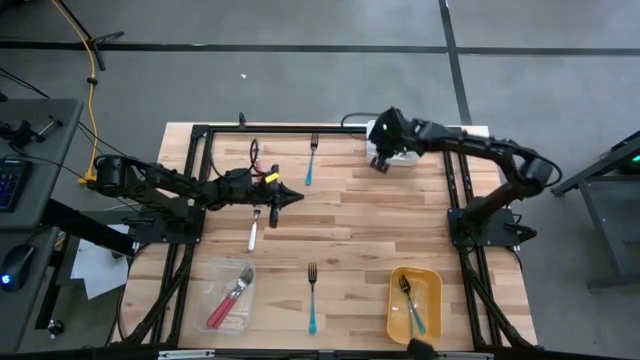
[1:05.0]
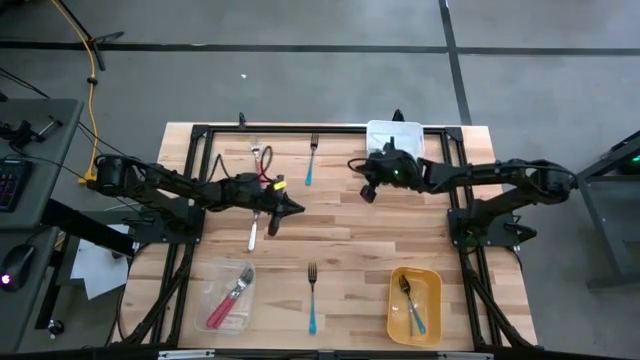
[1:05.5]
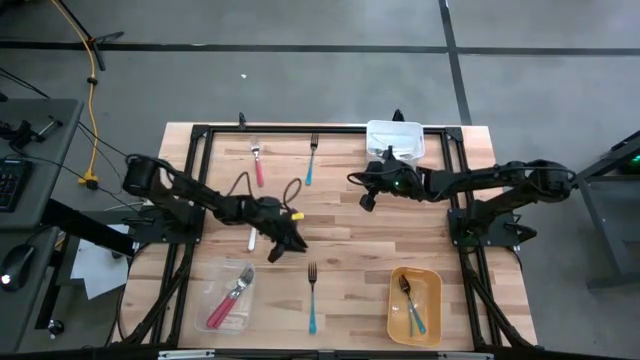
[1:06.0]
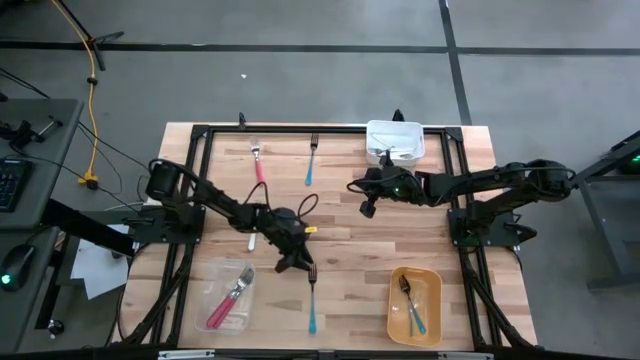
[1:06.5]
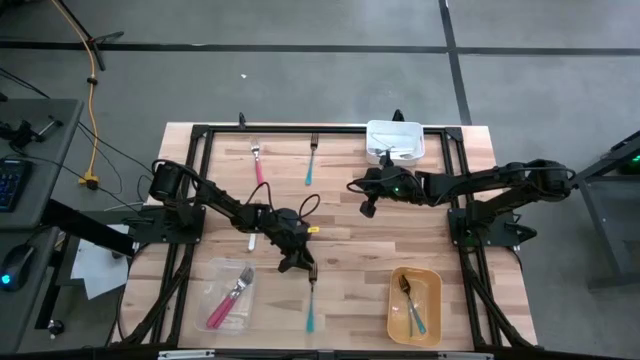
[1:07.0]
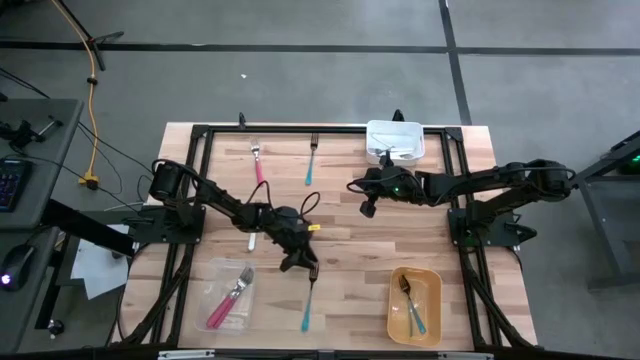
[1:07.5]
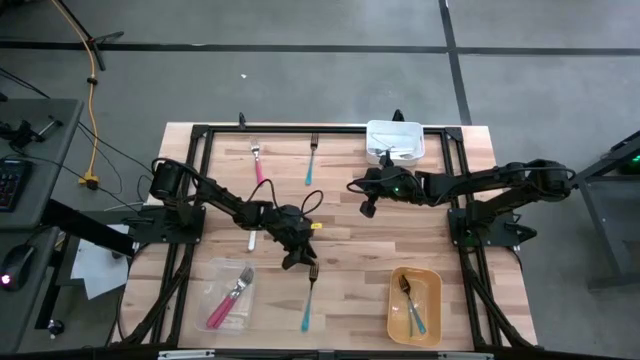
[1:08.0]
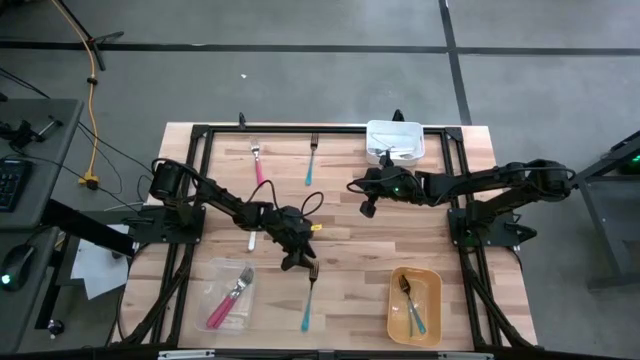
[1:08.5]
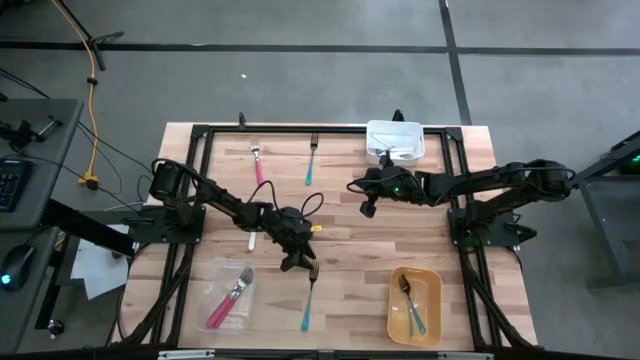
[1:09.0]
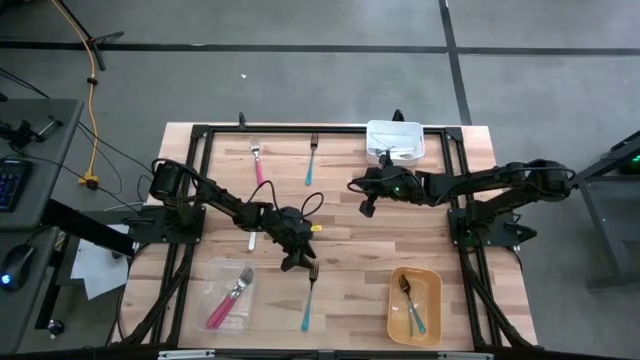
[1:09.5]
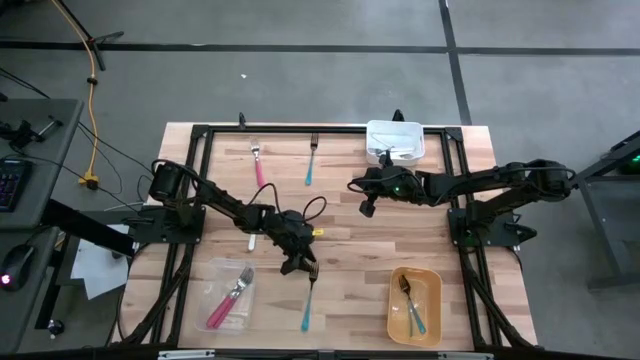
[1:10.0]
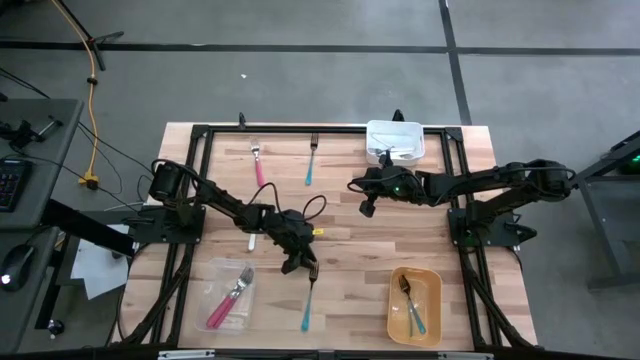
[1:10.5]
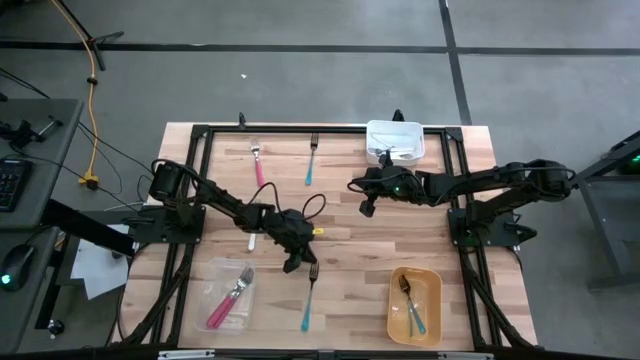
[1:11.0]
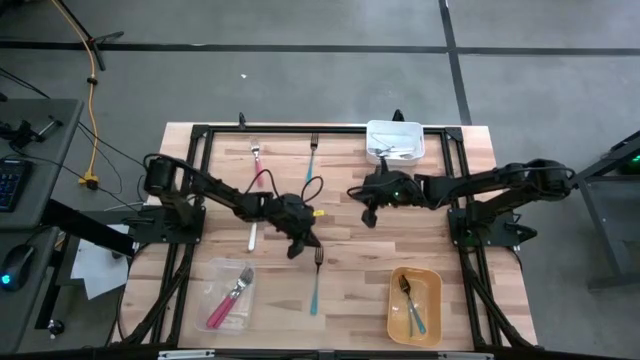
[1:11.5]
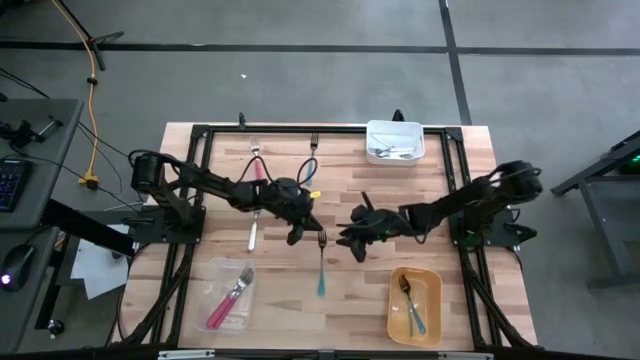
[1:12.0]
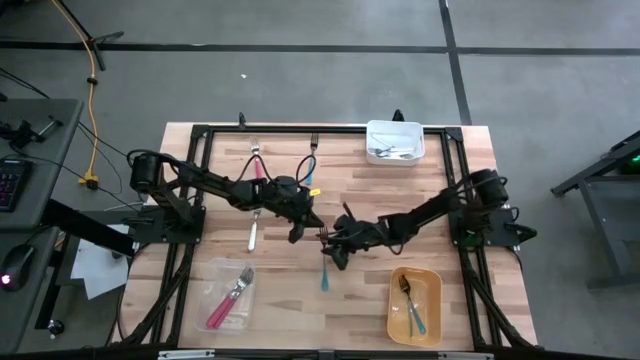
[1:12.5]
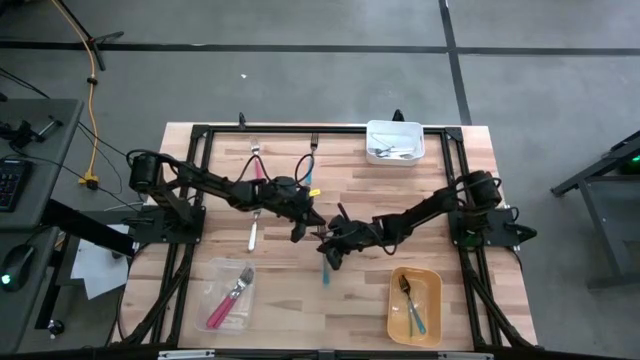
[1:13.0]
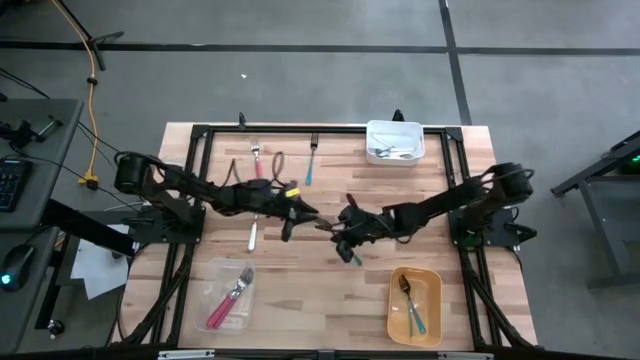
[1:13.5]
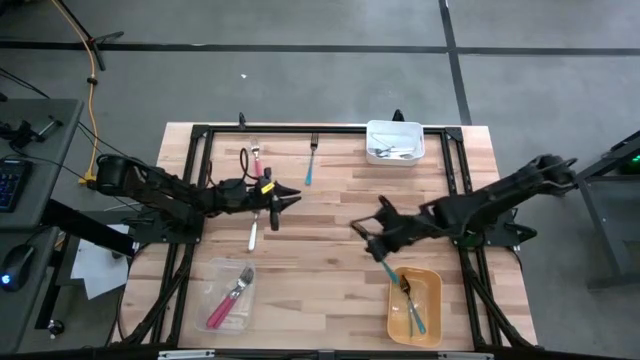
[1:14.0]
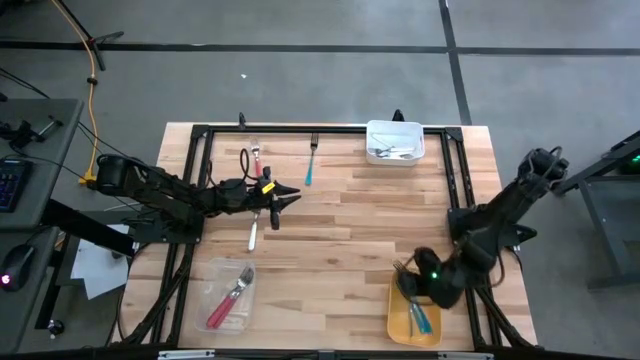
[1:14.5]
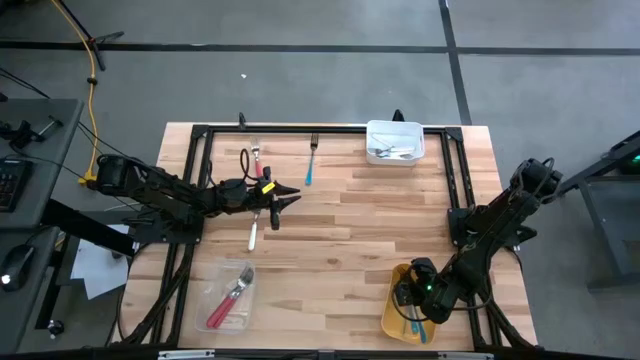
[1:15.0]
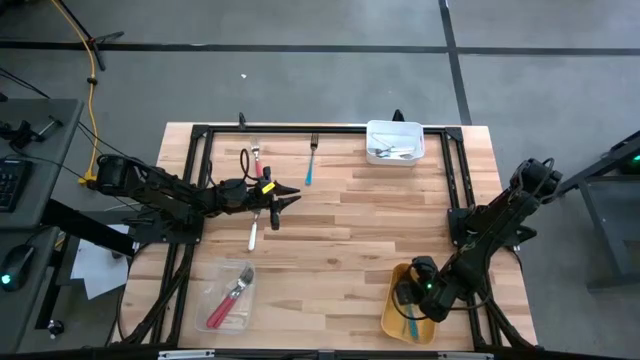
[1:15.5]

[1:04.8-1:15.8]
Task: Sort silverware by color (type)
Put the bottom blue fork into the yellow bin

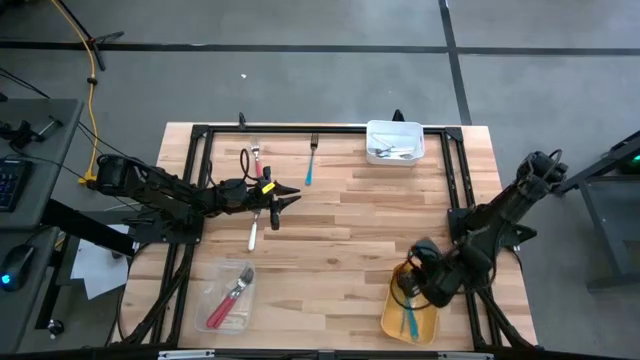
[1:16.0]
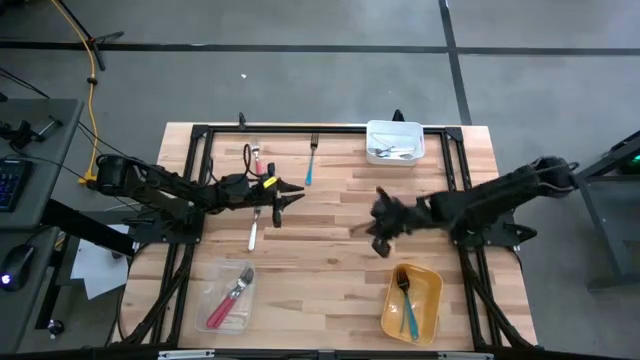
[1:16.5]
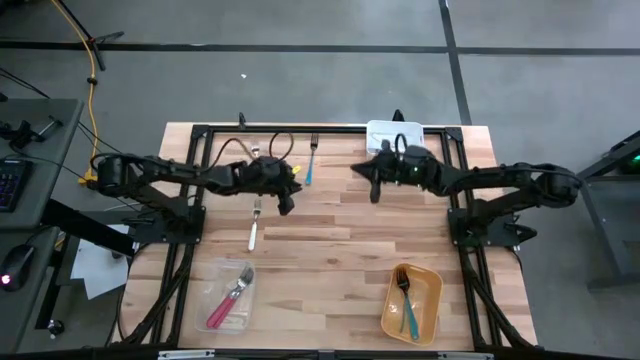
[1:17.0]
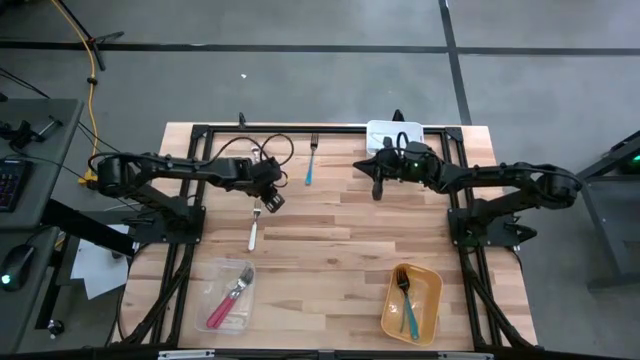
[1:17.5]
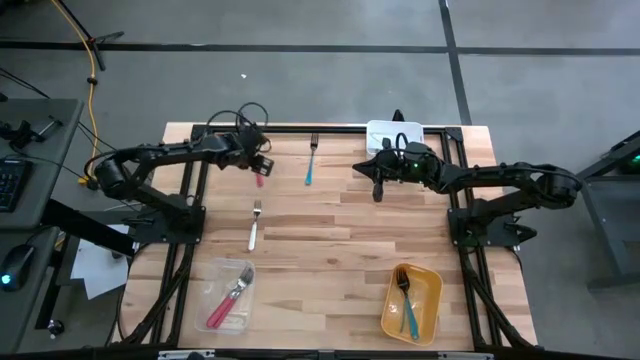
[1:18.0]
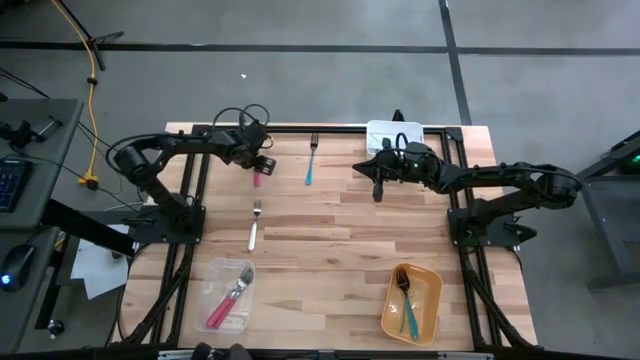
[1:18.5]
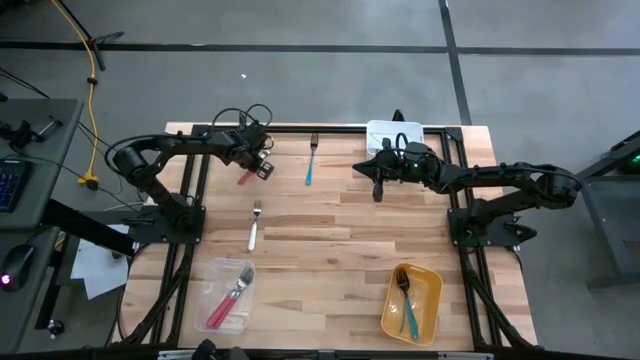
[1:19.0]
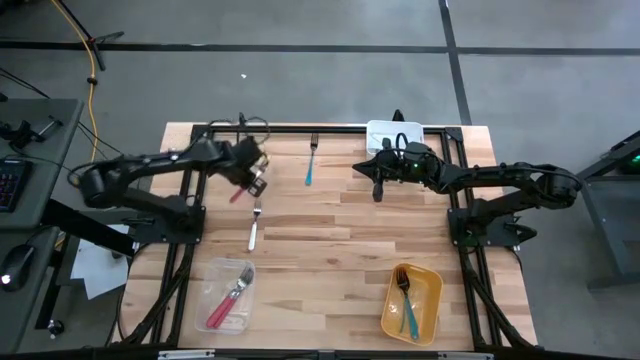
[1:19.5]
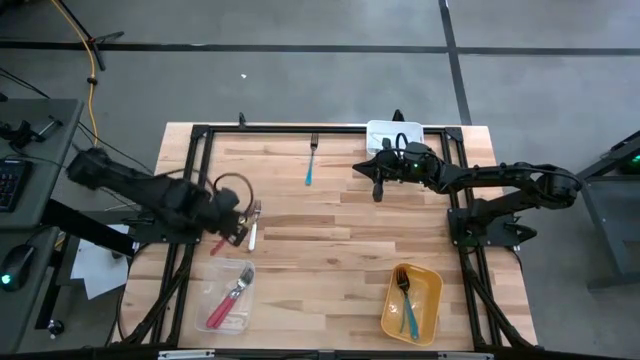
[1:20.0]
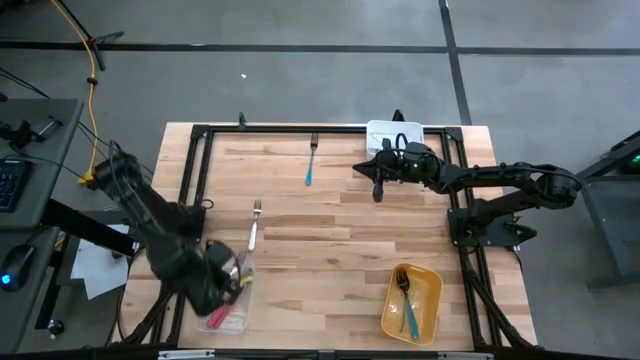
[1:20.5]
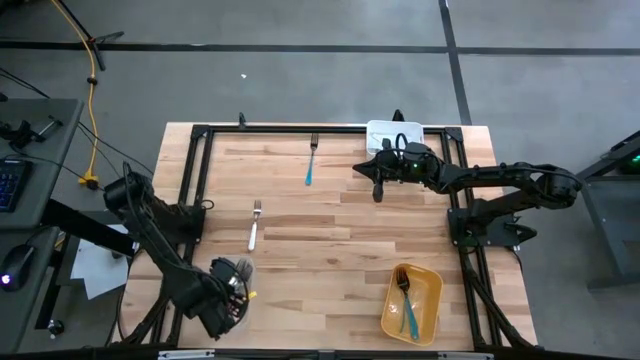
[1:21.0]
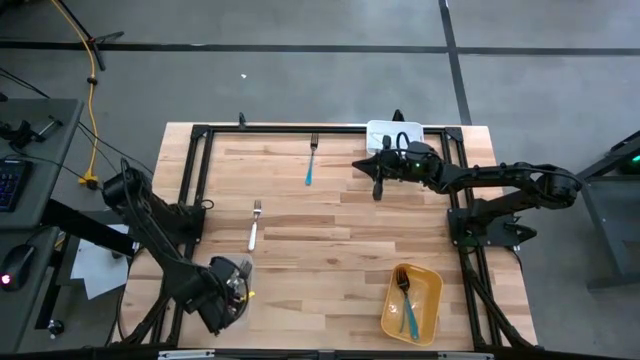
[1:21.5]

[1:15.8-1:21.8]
Put the pink fork into the transparent bin

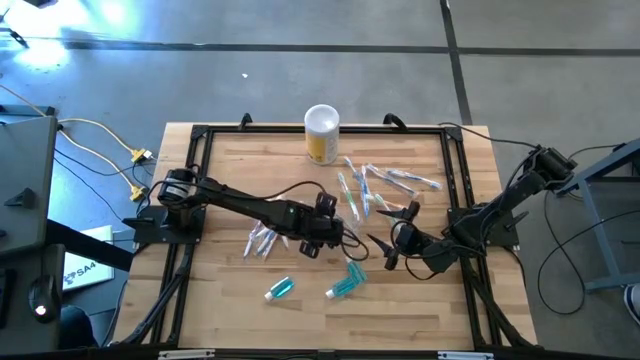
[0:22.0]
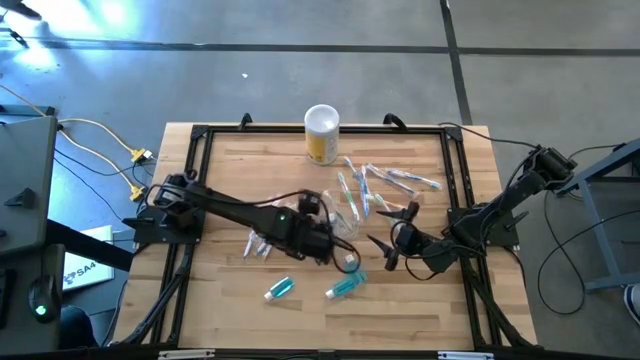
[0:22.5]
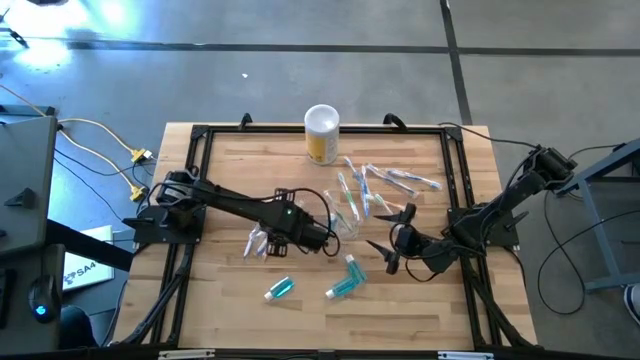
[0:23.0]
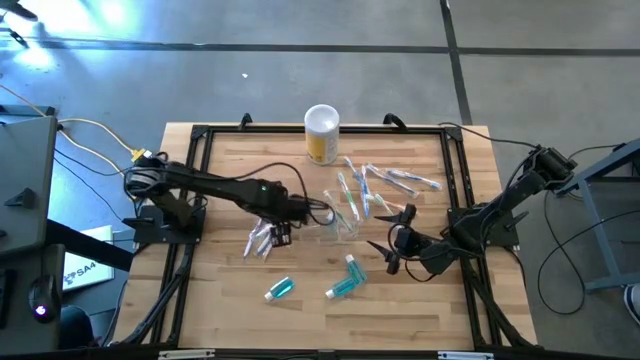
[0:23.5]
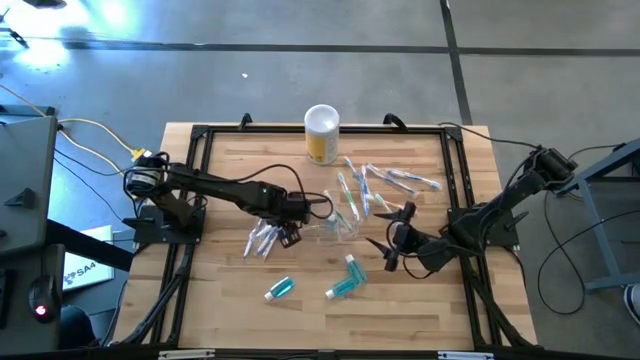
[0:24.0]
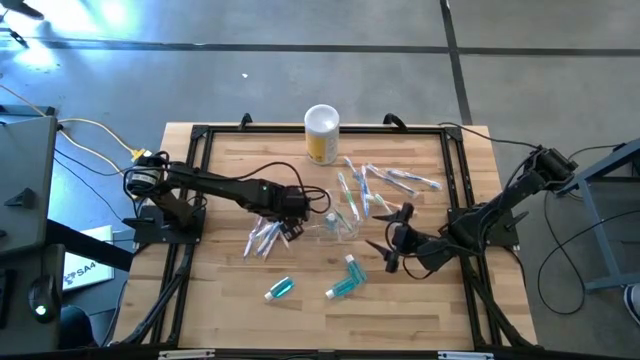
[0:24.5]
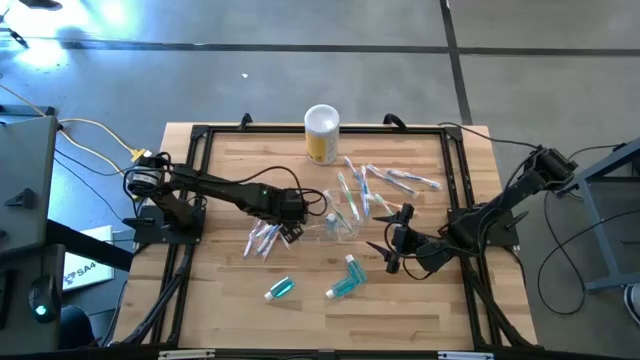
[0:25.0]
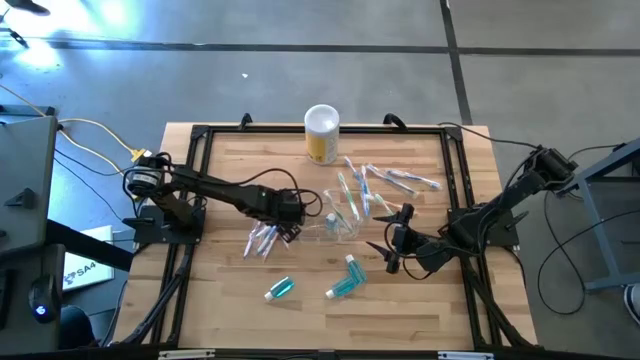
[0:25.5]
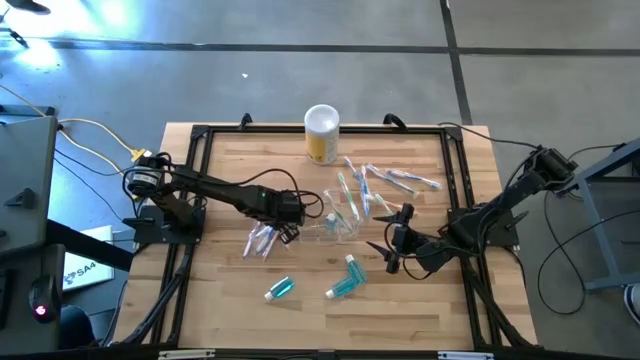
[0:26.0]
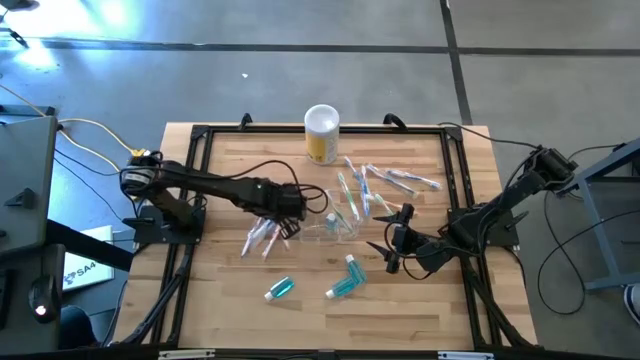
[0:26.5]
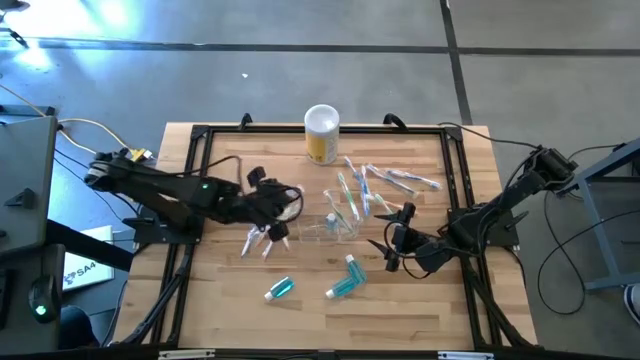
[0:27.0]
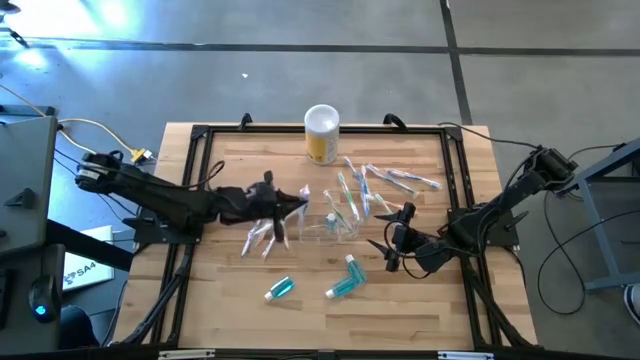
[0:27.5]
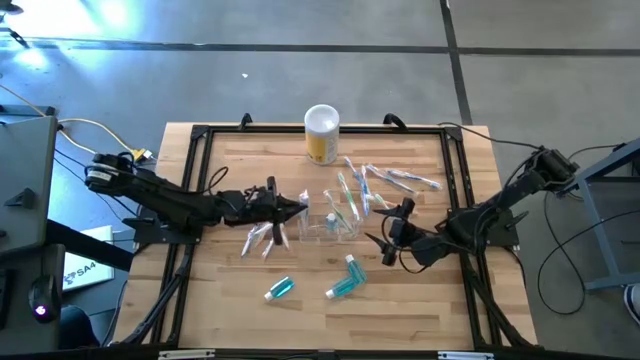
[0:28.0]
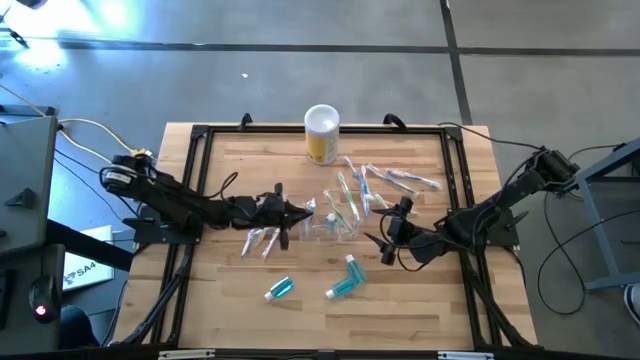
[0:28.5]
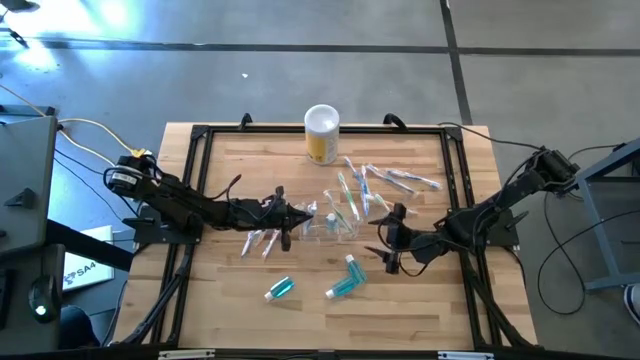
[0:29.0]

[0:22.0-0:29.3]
Task: Pick & Place toothbrushing station
Put the blue toothbrush in the transparent organizer
